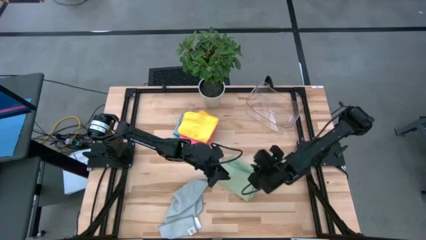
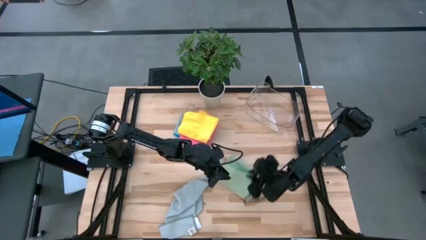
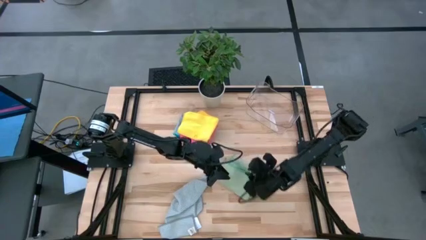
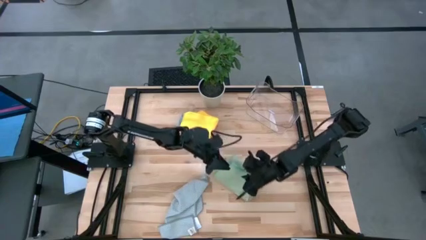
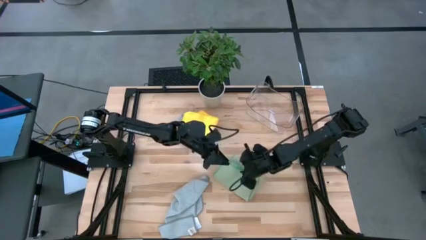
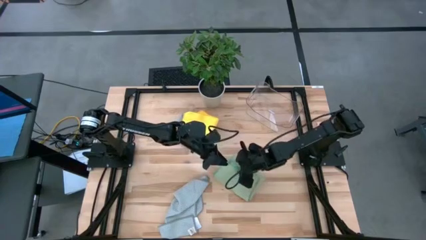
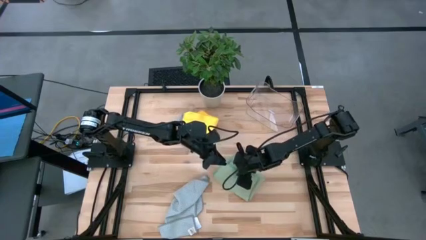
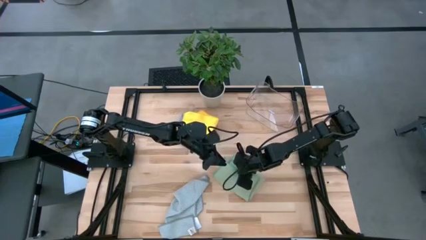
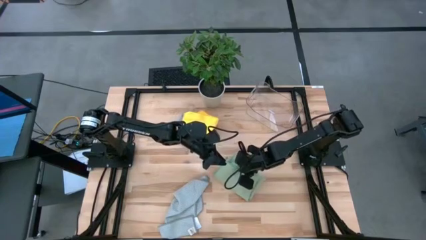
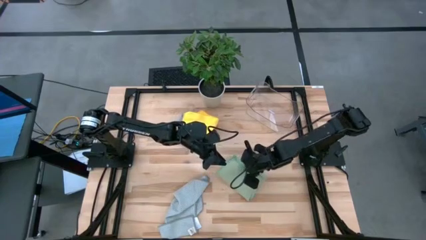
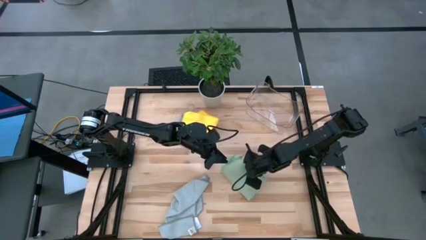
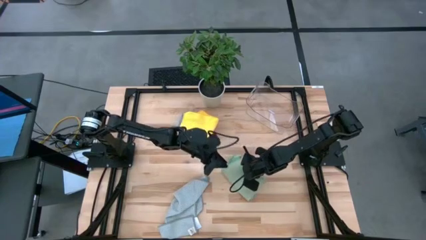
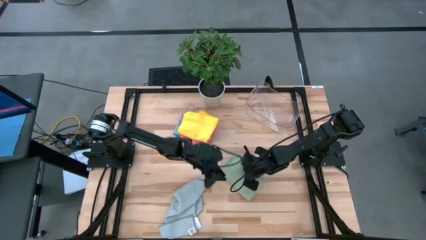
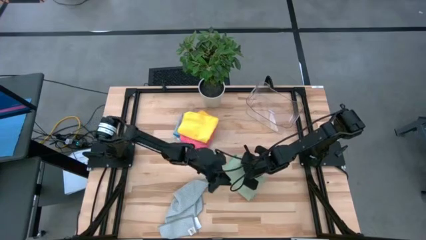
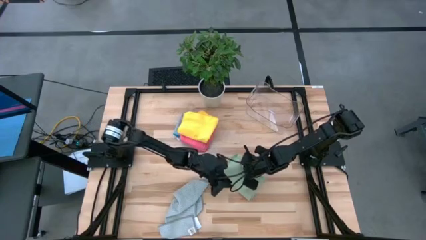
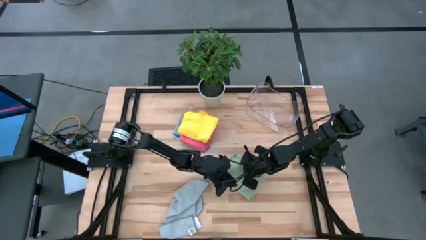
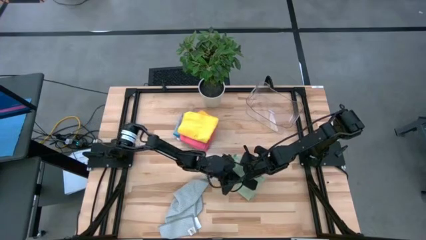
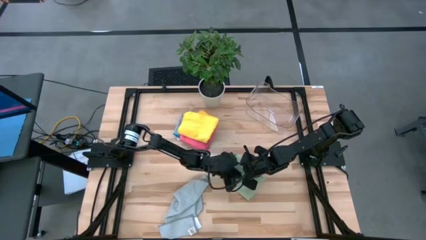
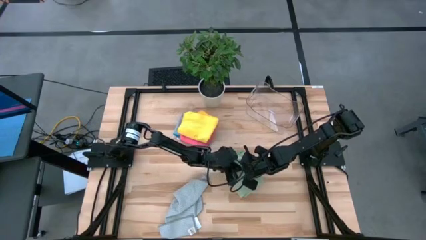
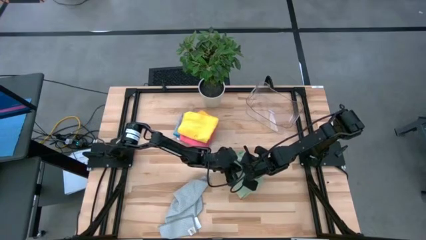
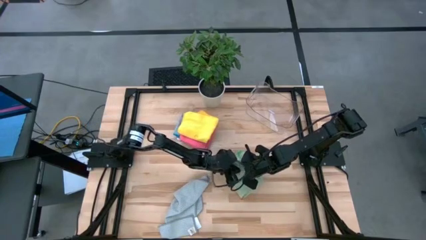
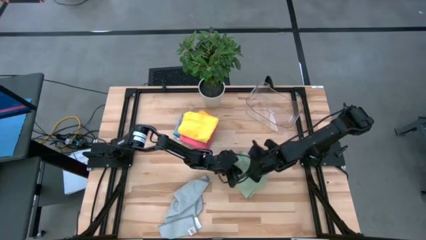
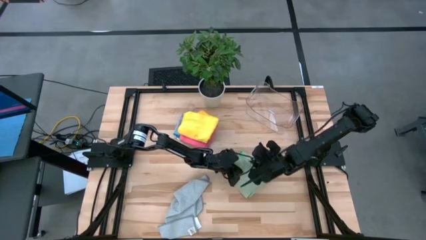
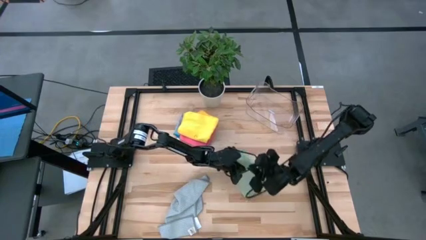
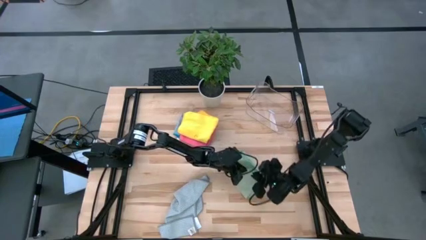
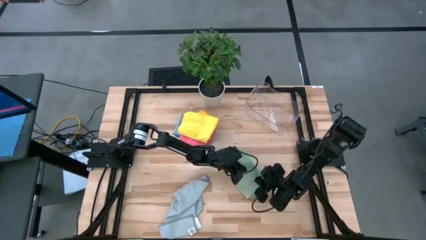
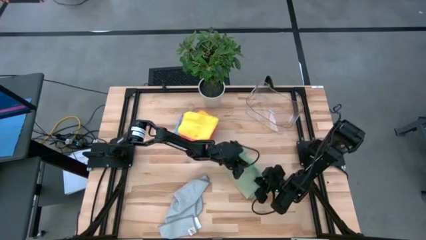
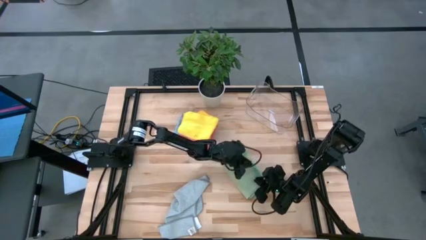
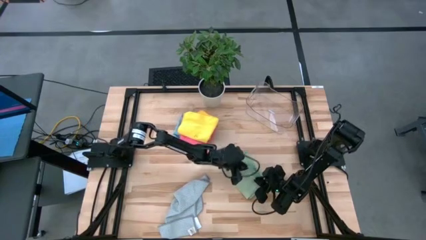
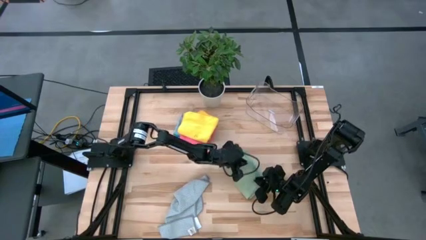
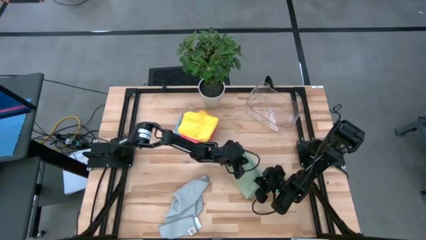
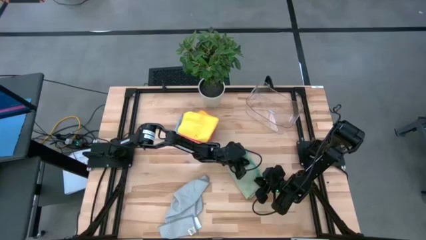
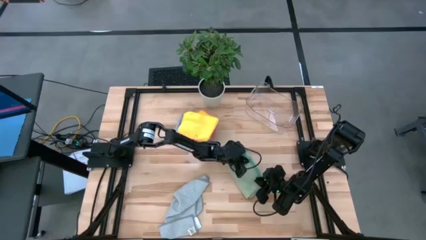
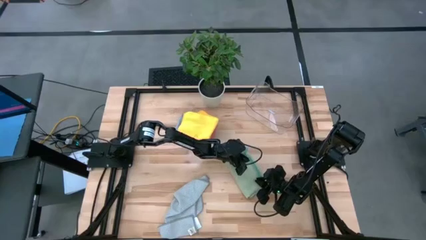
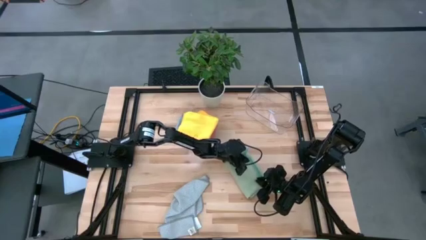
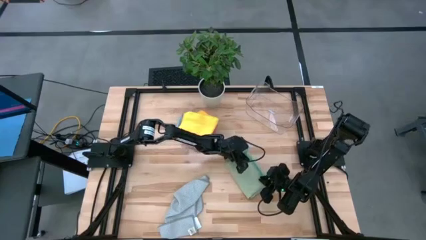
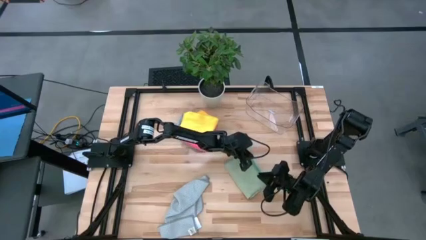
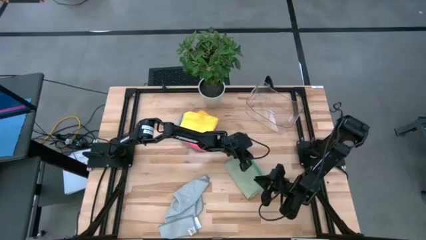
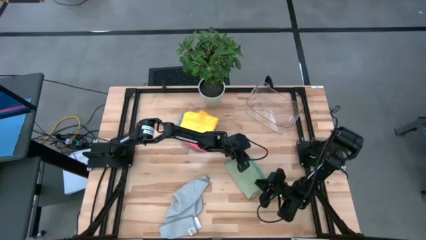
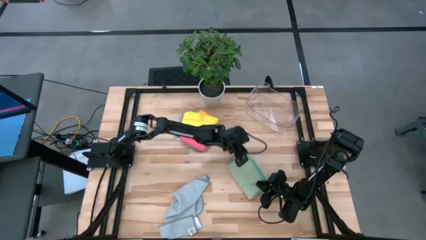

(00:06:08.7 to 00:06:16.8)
Task: Fold microfiber towels
Fold the light green microfiber towel

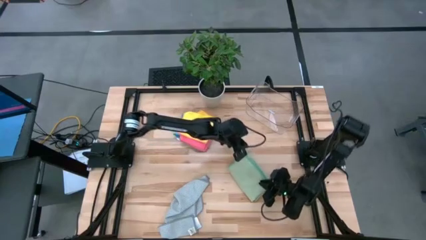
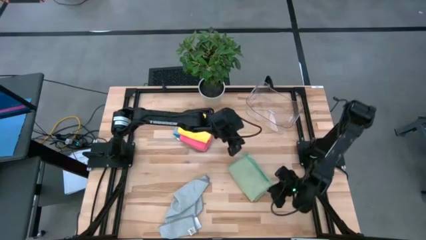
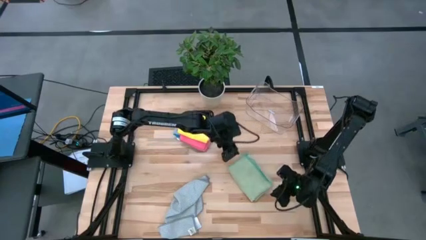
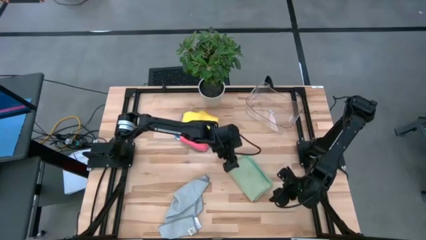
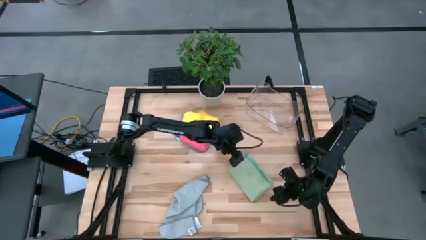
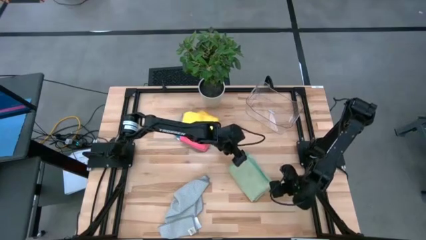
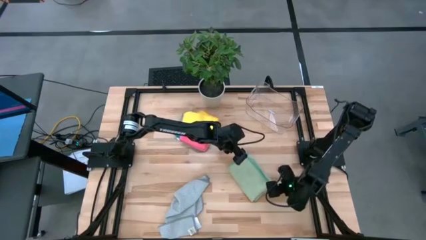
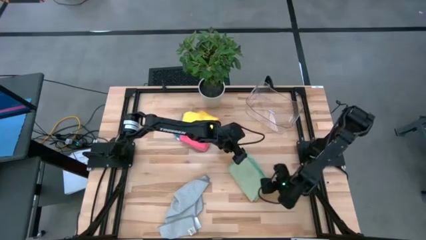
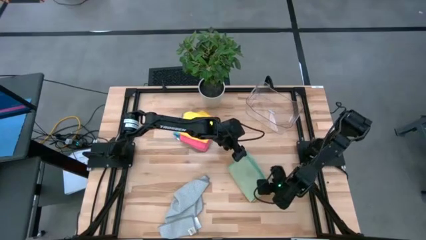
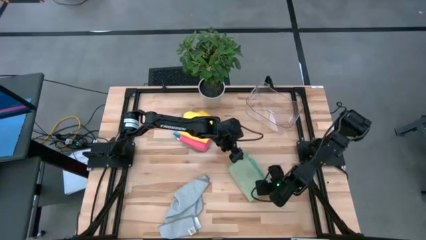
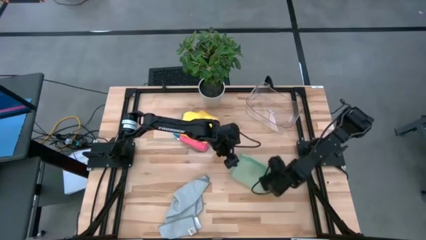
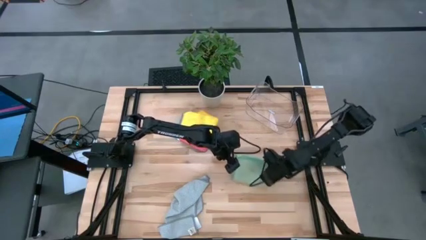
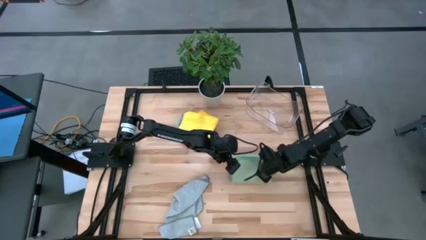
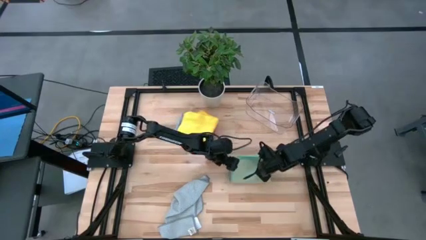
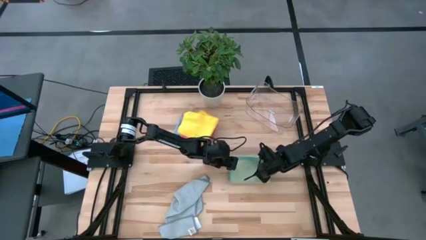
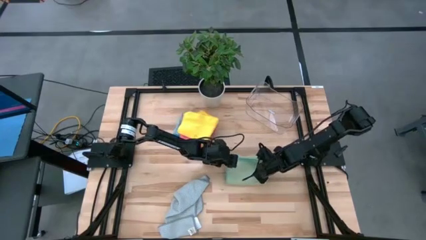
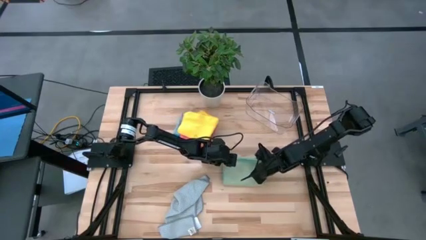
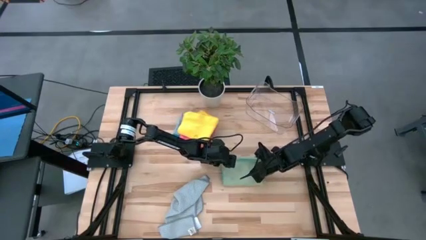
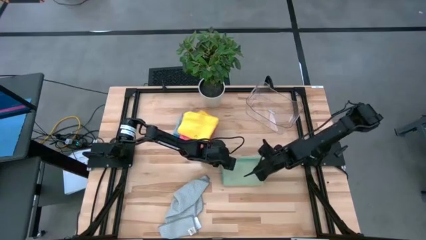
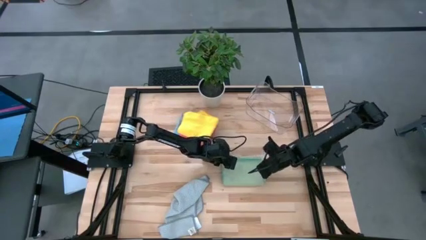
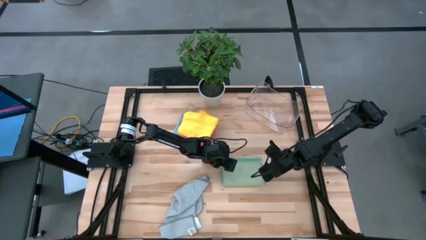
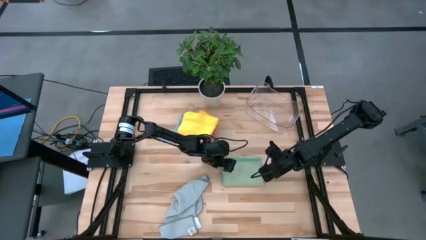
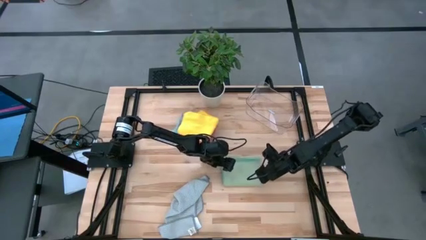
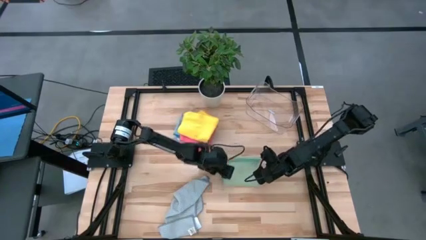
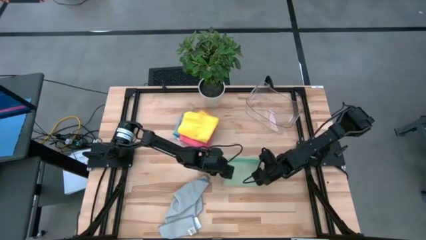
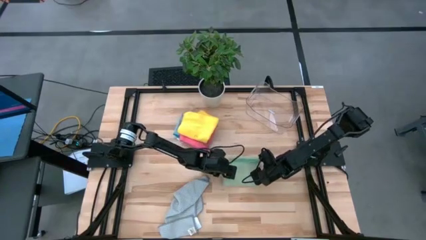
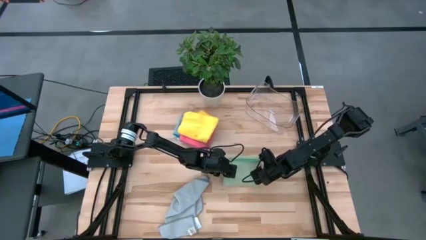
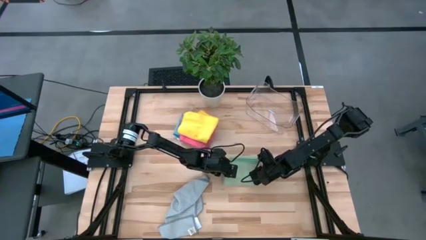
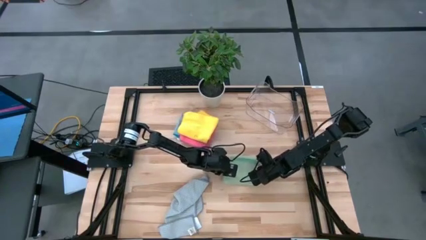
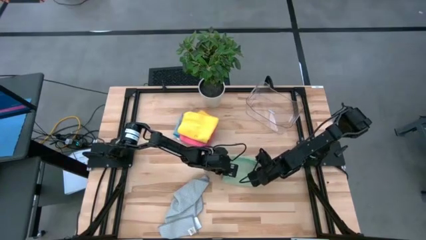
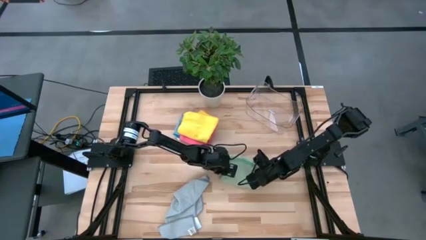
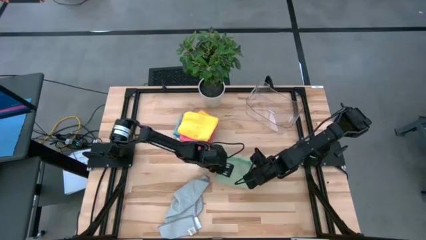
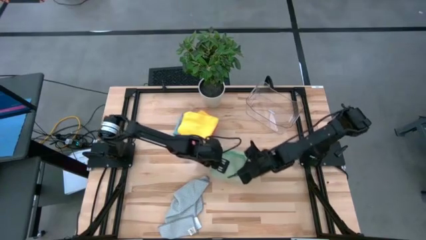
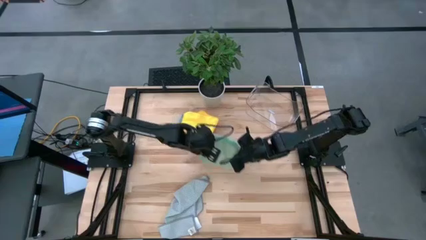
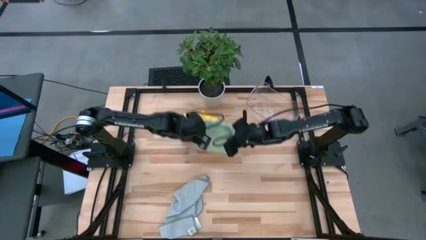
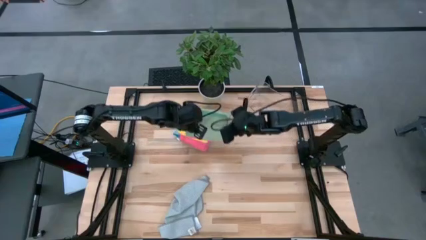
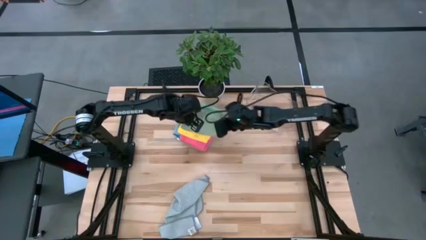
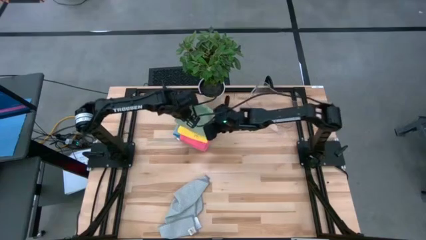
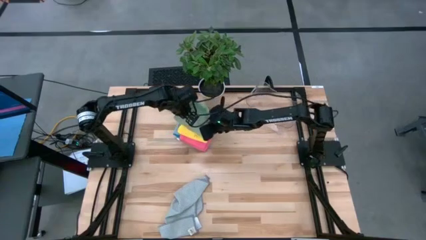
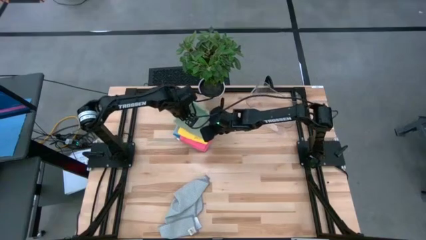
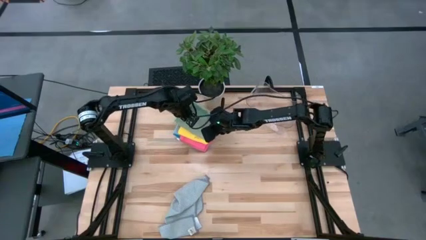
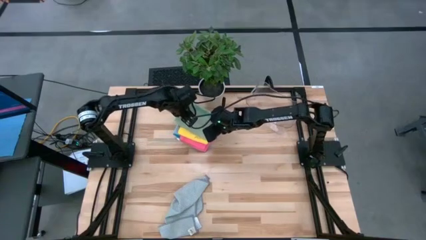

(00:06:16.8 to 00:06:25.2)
Stack the light green microfiber towel on the yellow microfiber towel
